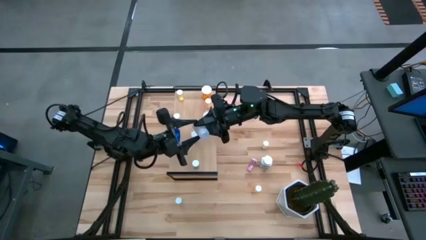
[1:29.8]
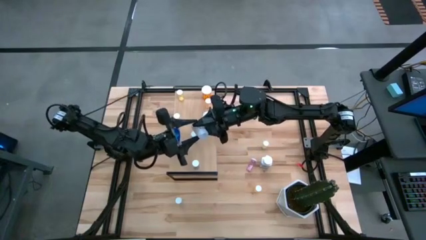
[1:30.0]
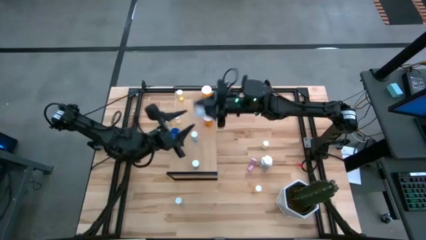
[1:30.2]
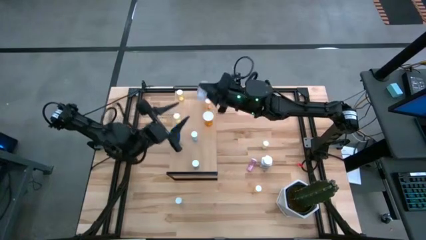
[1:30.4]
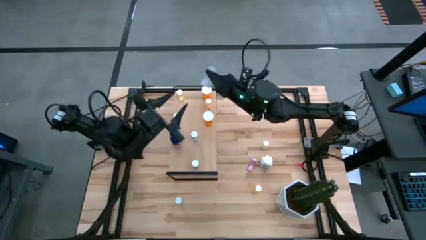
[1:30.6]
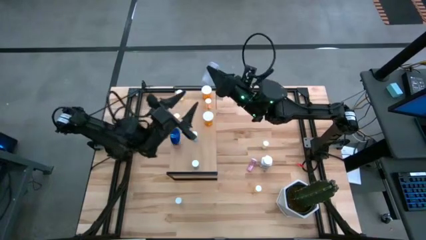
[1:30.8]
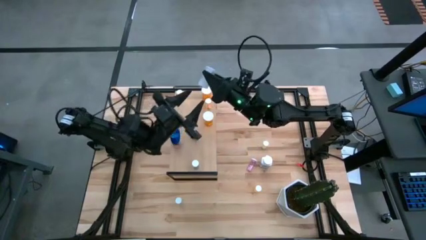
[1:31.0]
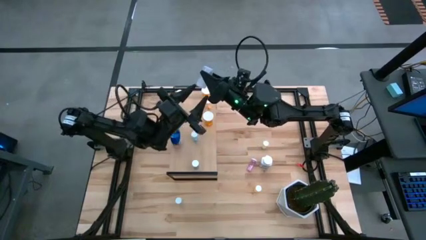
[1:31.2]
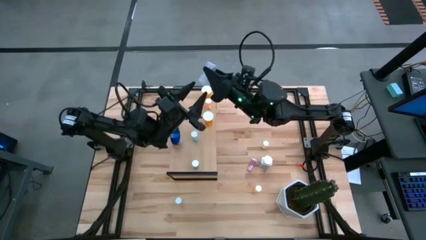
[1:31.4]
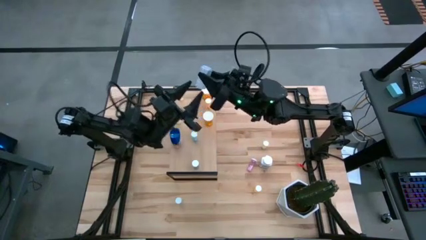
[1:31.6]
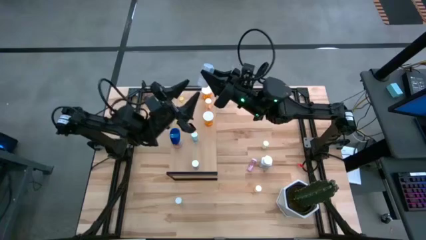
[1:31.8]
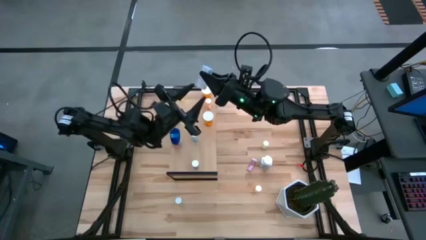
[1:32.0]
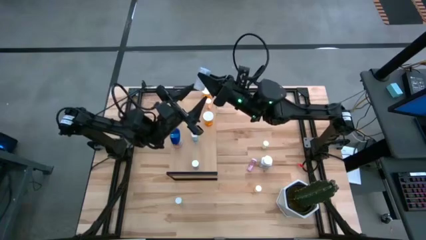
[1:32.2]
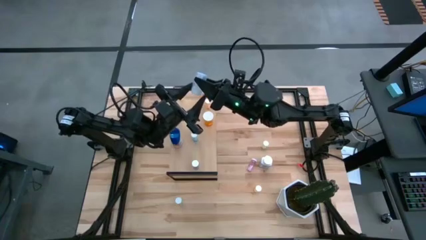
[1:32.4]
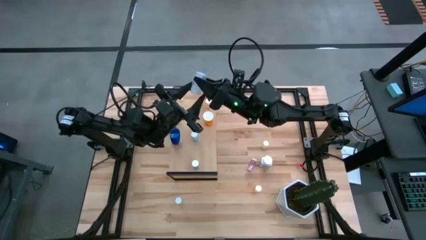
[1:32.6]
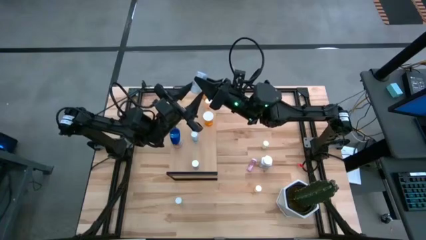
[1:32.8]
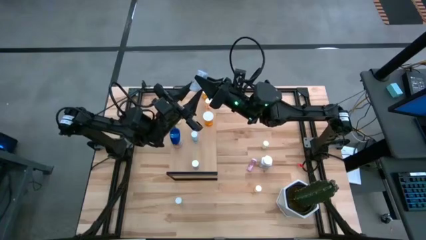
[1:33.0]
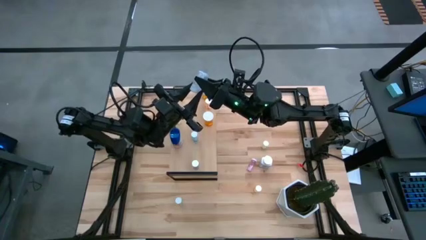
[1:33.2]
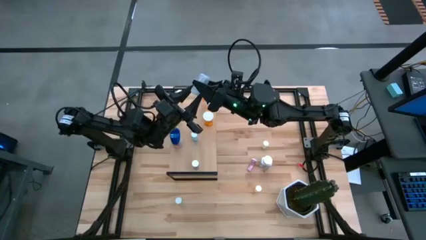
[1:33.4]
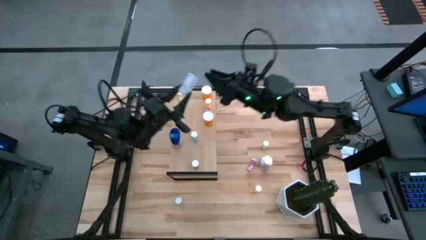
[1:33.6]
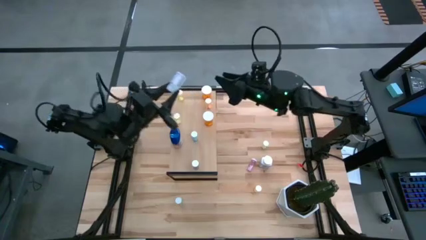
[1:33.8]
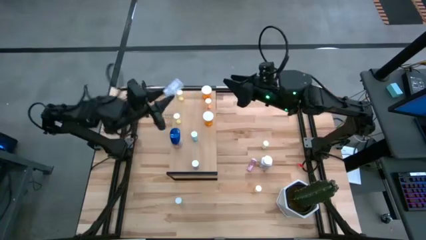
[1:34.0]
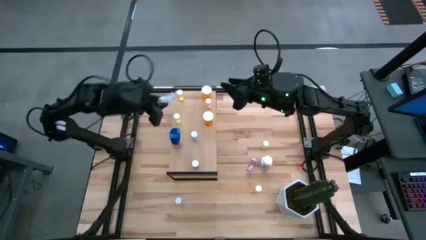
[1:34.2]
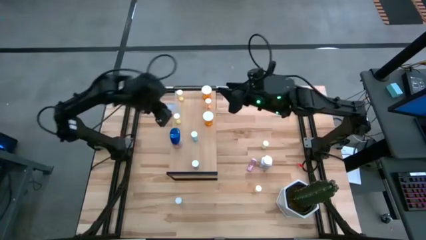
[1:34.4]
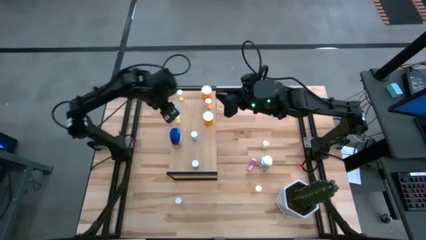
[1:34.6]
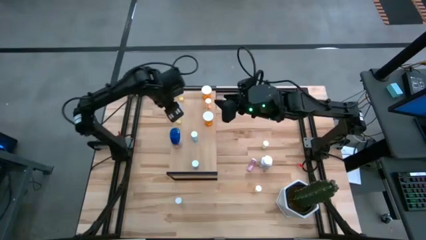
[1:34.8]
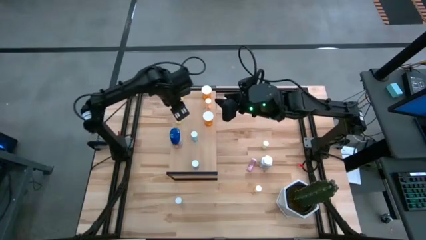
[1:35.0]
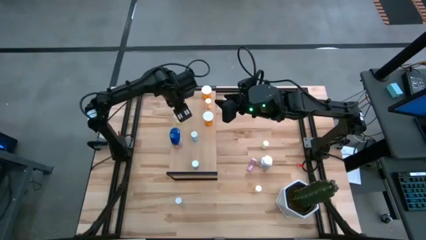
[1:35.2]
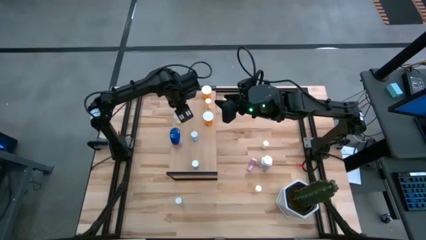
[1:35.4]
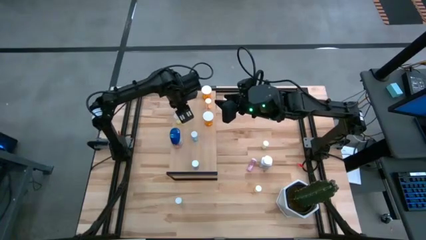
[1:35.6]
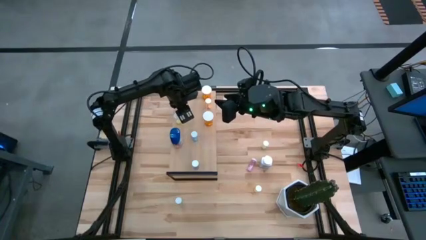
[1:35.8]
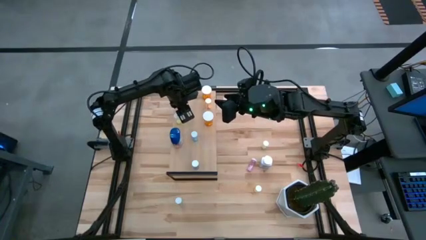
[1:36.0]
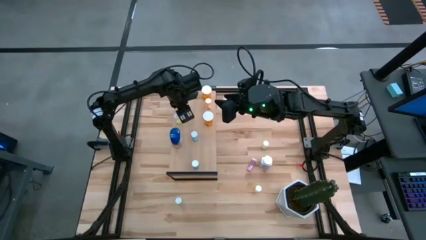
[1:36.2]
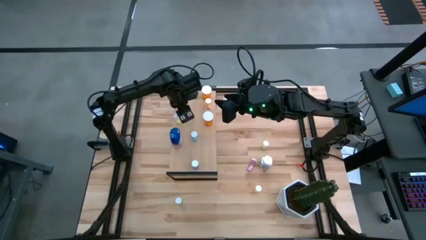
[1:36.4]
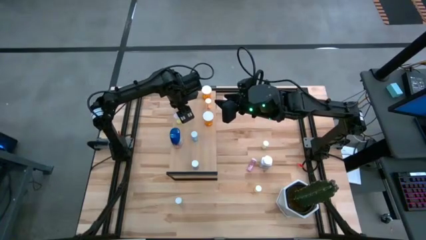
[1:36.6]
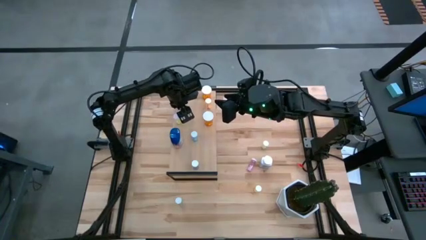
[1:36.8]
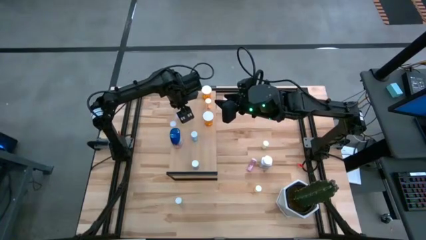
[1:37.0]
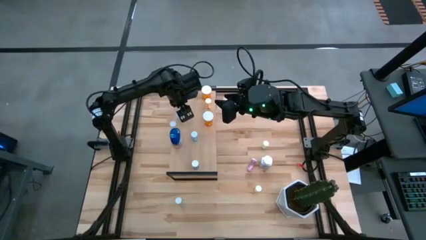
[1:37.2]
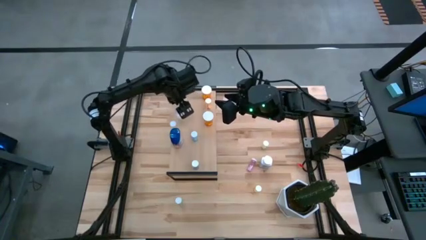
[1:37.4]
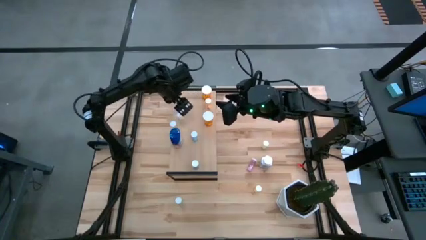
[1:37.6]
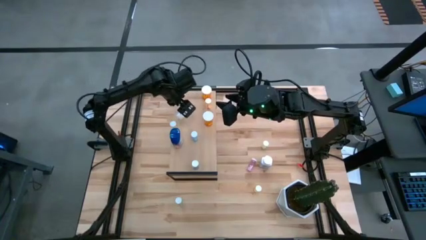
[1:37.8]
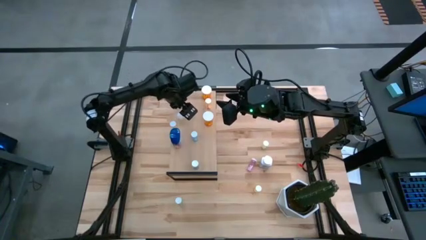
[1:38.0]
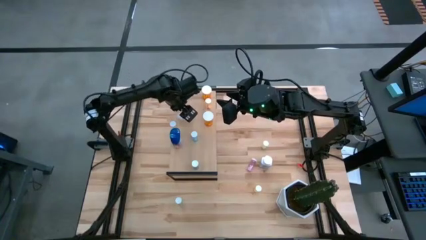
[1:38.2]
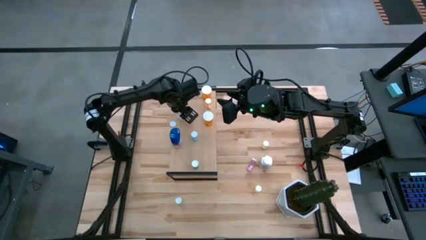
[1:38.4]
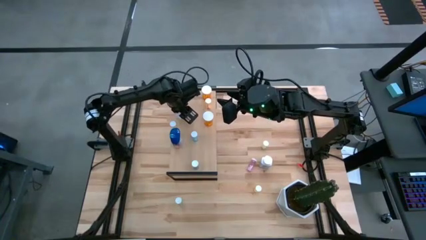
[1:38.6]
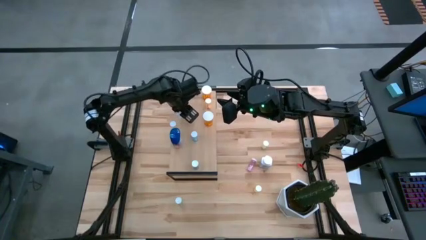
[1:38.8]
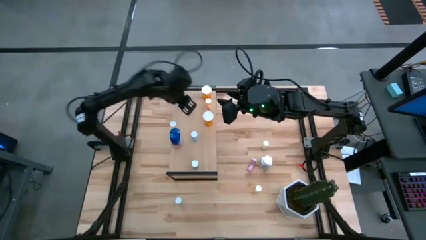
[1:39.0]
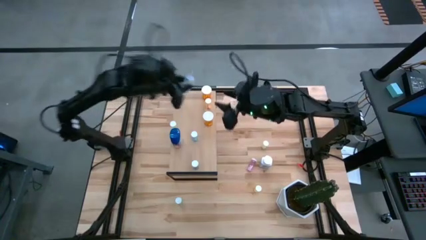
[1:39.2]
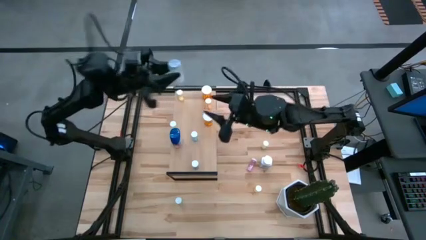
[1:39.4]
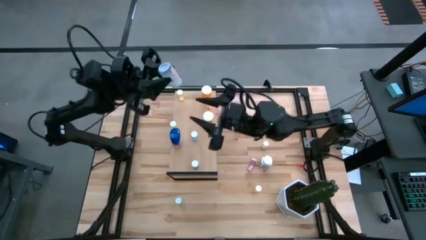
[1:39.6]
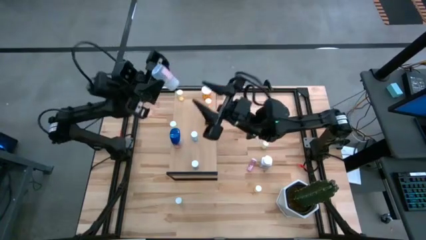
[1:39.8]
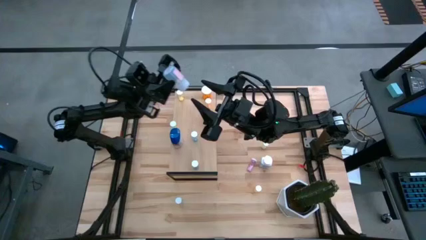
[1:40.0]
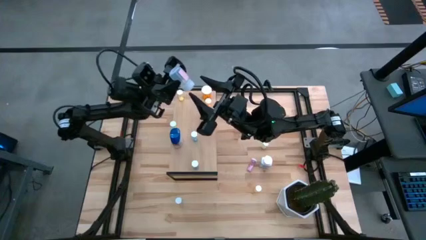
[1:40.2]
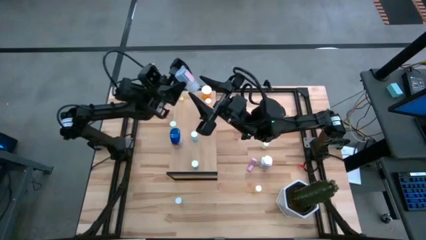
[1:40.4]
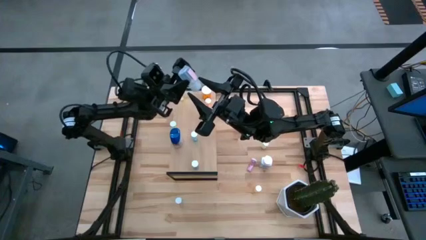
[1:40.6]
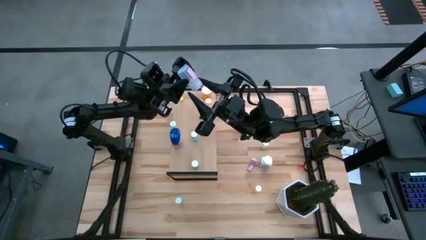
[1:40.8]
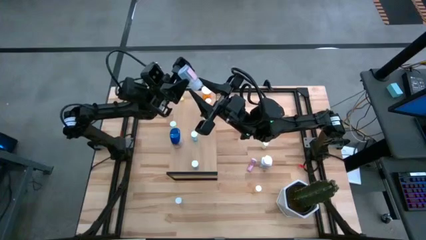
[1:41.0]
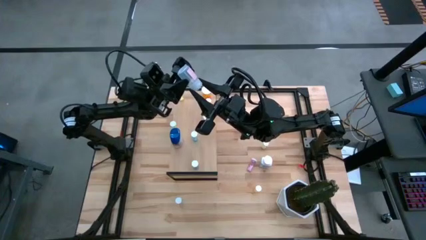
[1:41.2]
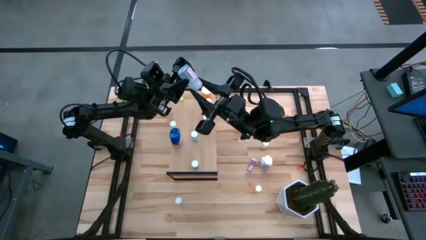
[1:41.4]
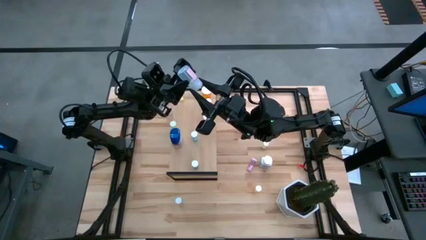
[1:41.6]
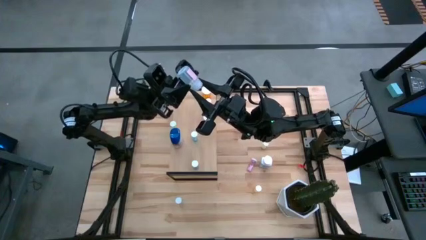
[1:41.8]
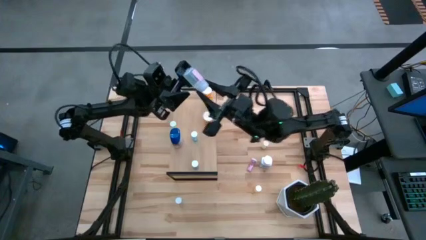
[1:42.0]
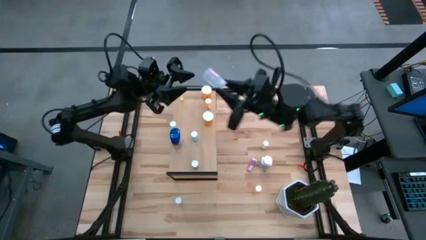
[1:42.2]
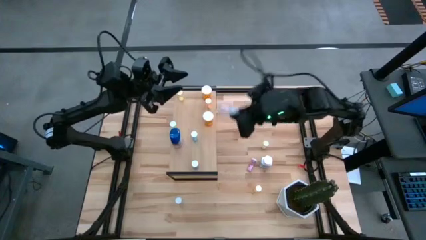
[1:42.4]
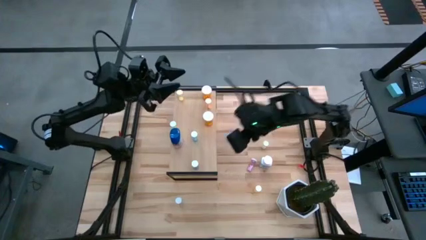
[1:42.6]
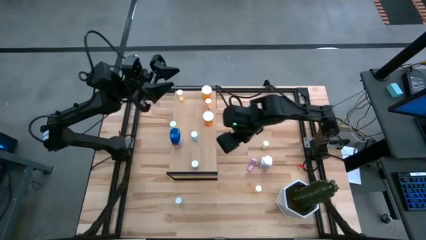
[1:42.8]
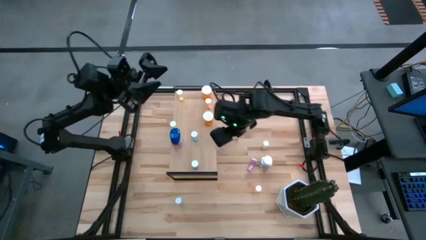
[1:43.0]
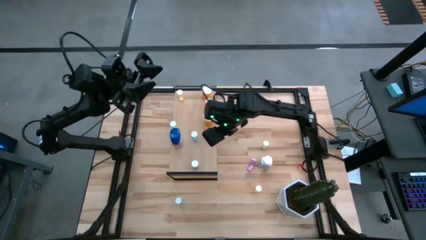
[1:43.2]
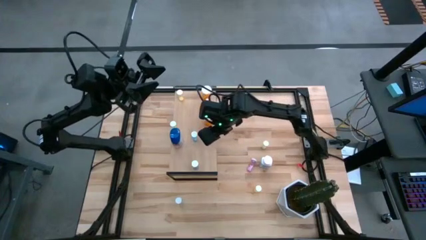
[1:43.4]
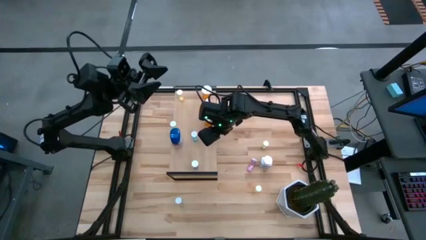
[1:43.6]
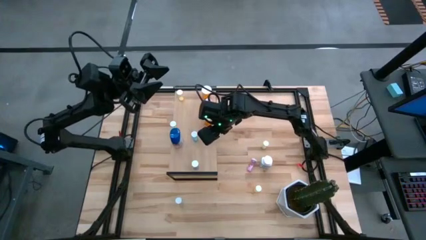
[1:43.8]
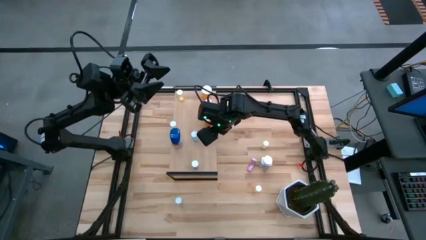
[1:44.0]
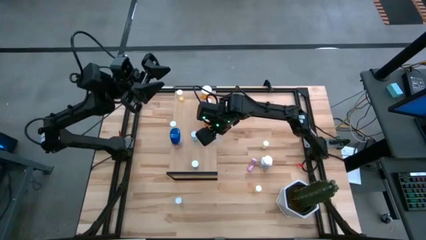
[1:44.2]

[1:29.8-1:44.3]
Task: Pick and place medicine bottles onto shelf by color
Put the middle transparent pill bottle on the shelf

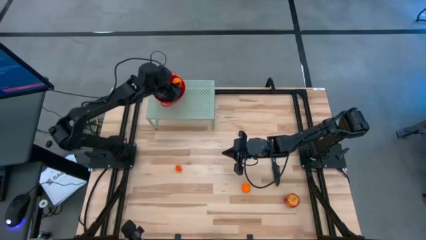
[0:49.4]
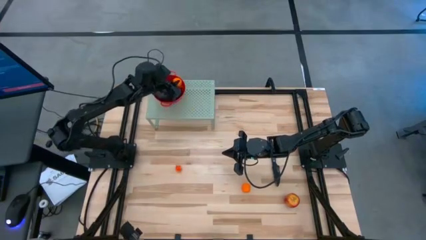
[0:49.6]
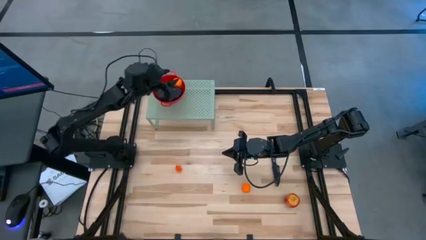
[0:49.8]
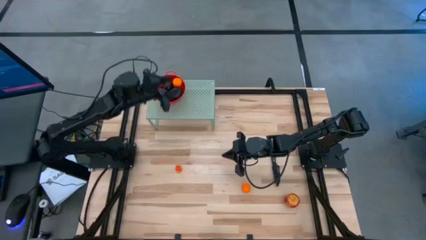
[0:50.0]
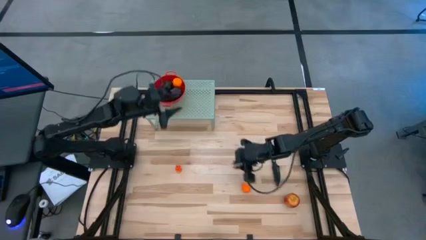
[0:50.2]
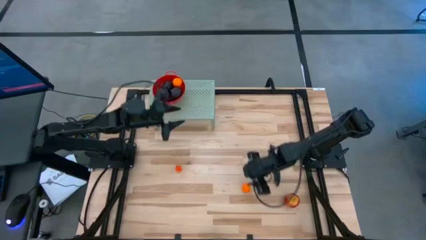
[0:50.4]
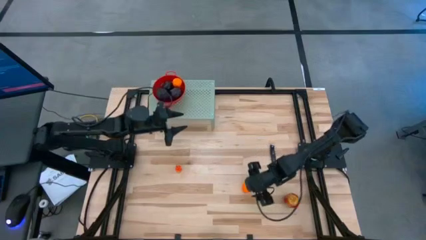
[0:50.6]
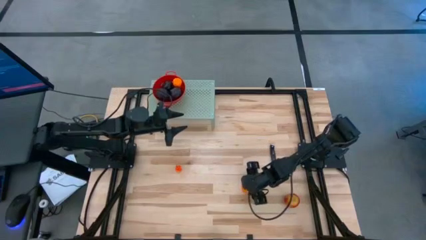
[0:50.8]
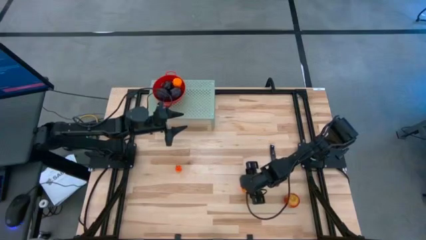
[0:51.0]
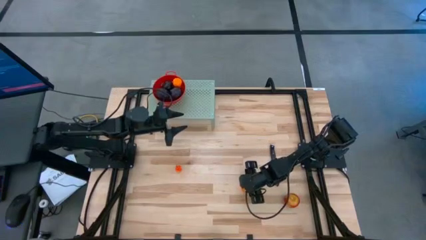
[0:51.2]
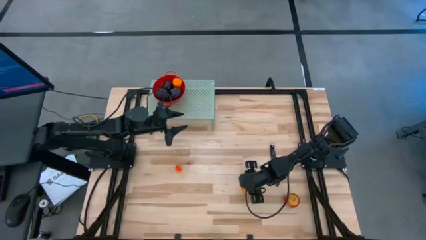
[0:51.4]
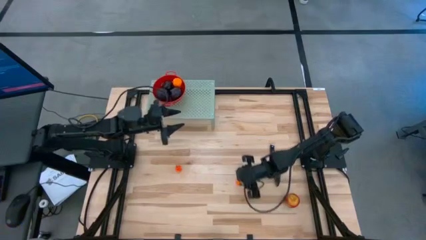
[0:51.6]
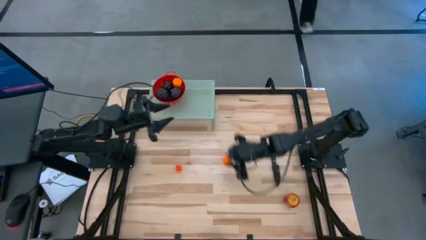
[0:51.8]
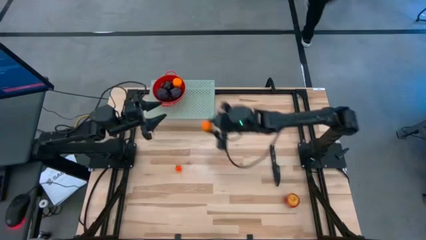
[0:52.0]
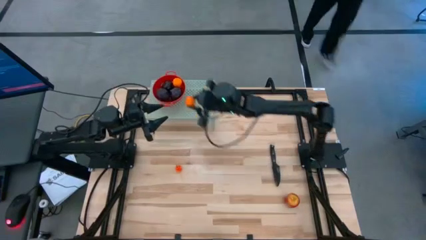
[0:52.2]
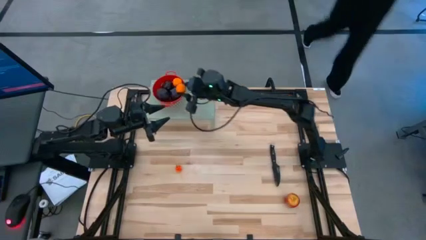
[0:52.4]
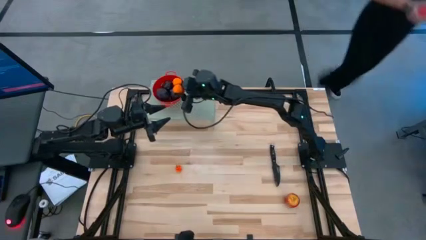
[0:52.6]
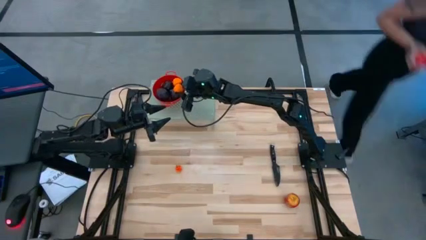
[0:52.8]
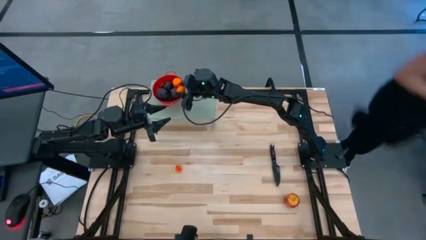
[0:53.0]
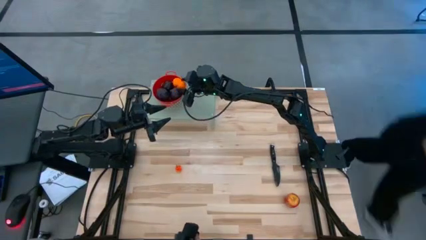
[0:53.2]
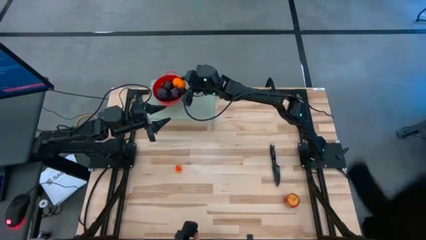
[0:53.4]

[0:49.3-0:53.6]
Task: Pick & Place Fruit
Put the orange fruit into the red strainer bowl
